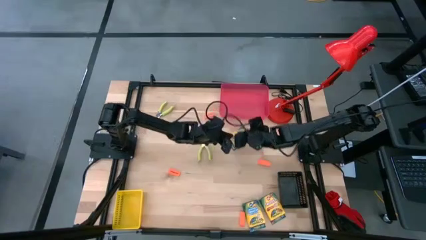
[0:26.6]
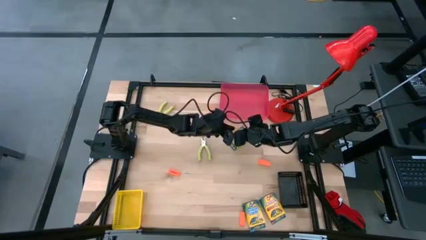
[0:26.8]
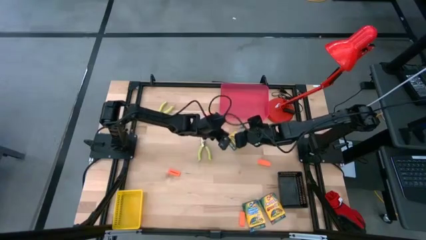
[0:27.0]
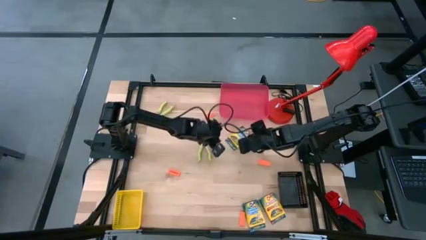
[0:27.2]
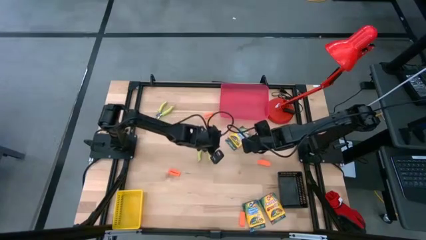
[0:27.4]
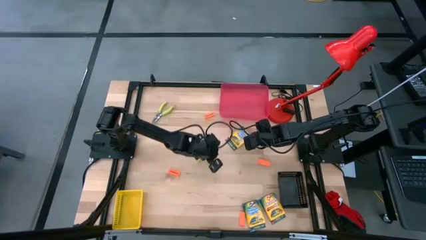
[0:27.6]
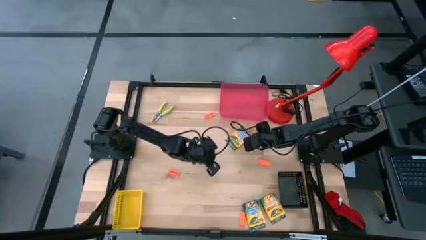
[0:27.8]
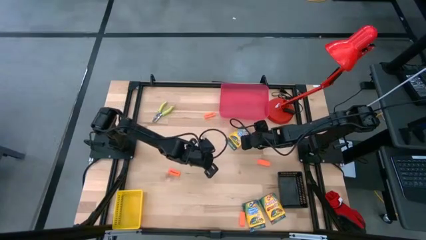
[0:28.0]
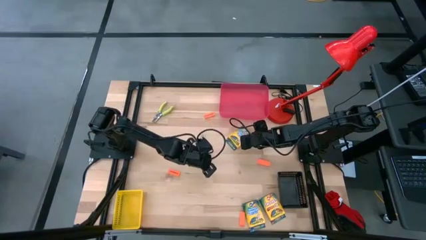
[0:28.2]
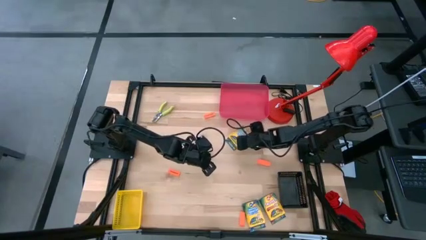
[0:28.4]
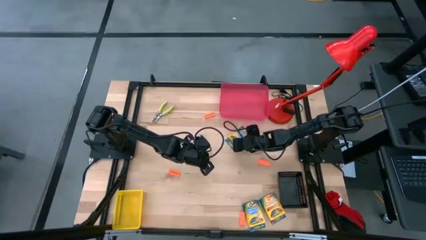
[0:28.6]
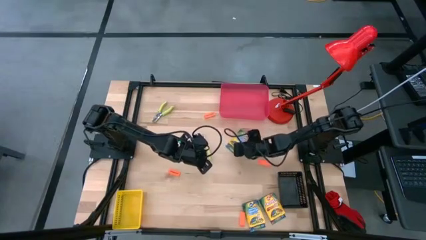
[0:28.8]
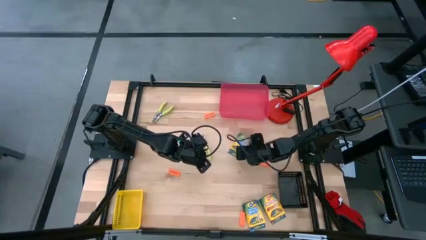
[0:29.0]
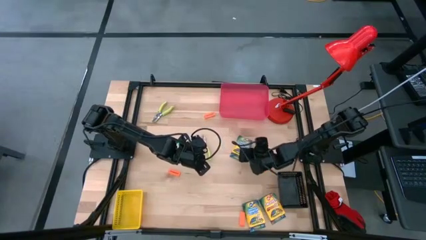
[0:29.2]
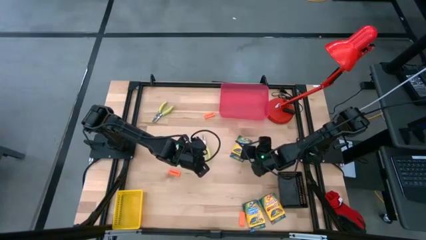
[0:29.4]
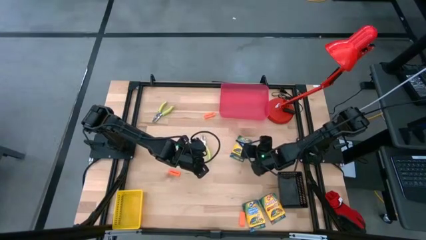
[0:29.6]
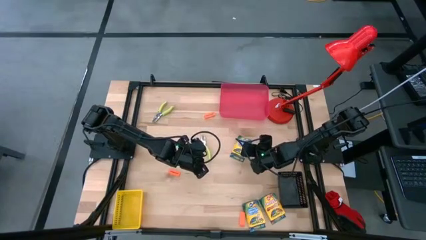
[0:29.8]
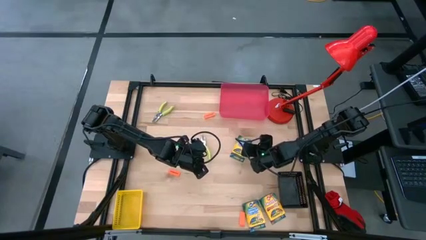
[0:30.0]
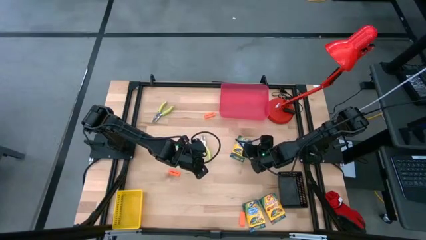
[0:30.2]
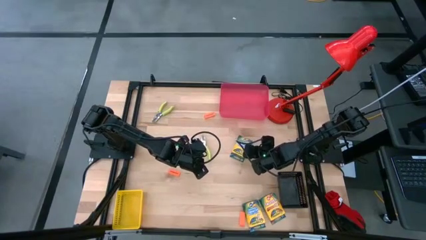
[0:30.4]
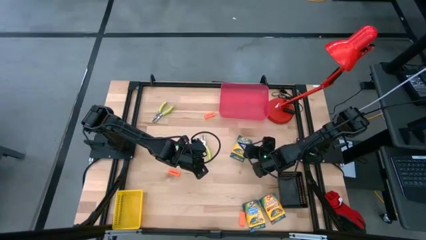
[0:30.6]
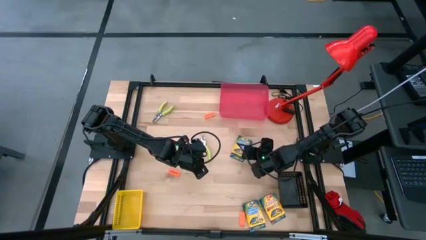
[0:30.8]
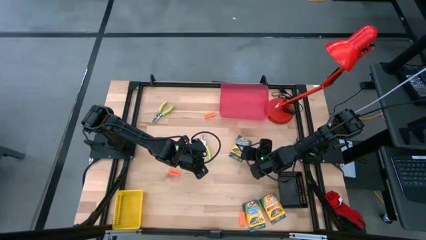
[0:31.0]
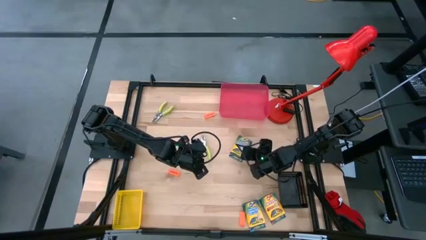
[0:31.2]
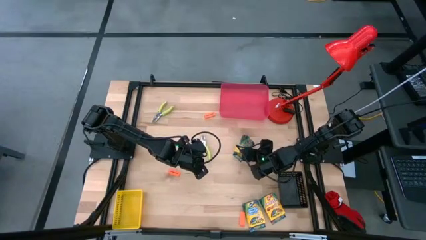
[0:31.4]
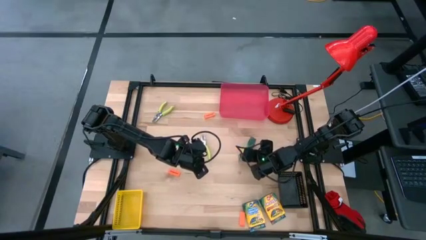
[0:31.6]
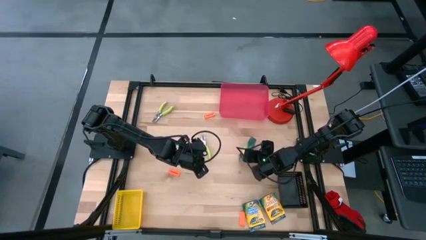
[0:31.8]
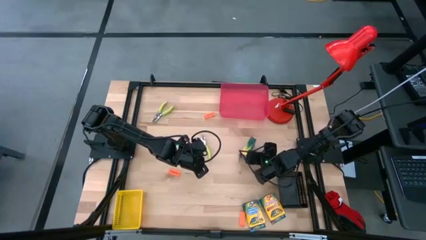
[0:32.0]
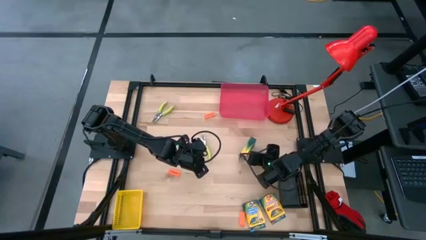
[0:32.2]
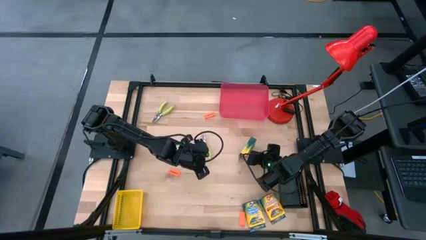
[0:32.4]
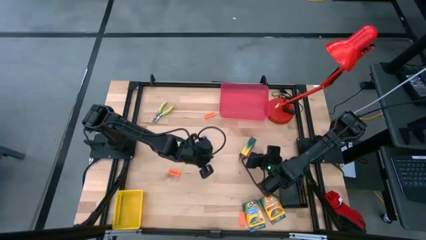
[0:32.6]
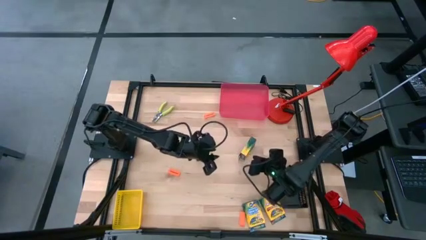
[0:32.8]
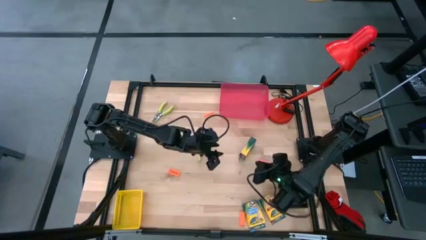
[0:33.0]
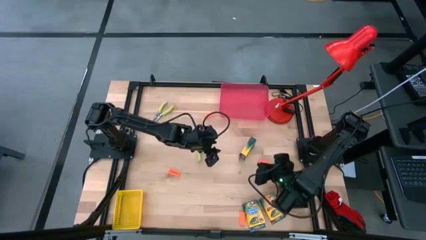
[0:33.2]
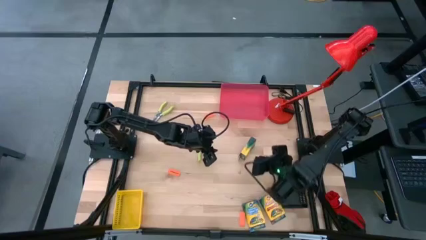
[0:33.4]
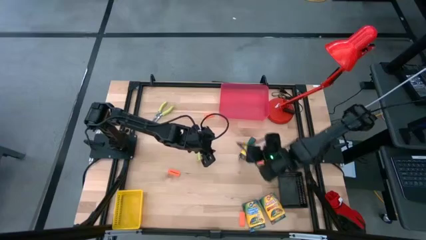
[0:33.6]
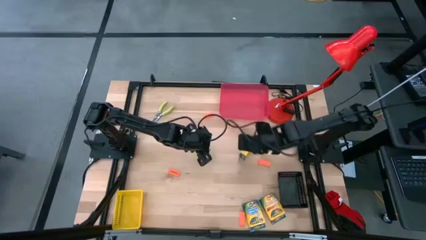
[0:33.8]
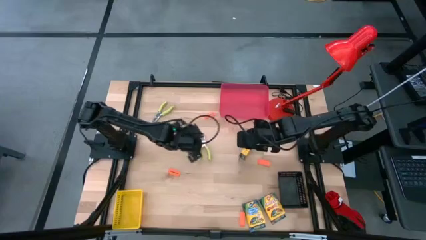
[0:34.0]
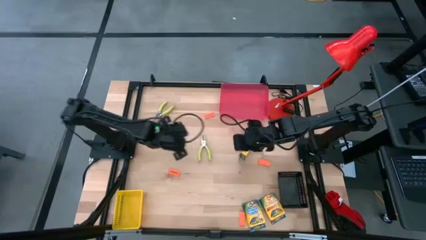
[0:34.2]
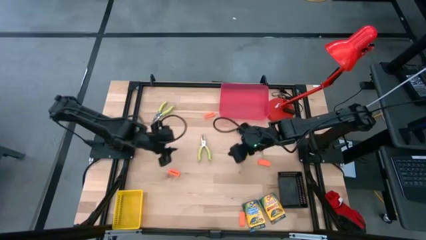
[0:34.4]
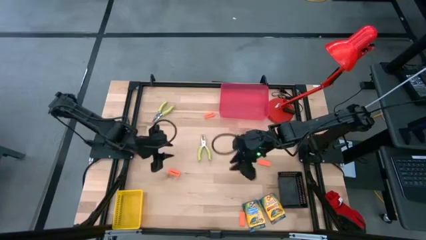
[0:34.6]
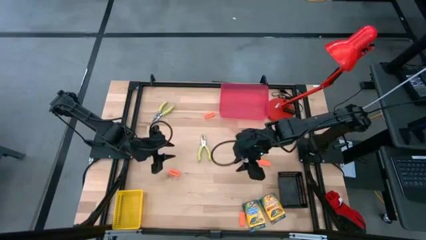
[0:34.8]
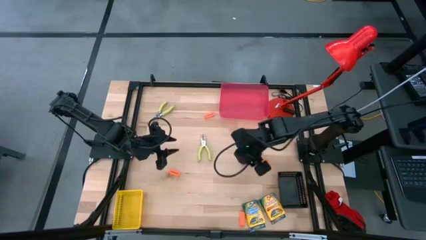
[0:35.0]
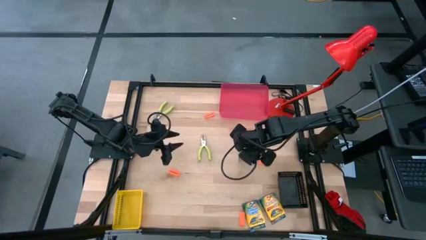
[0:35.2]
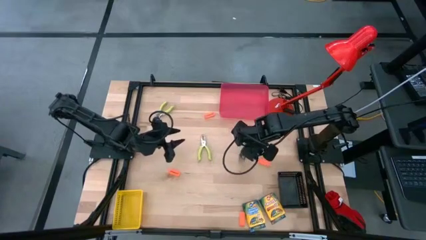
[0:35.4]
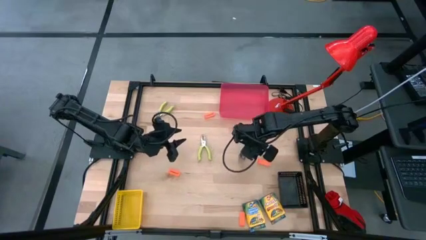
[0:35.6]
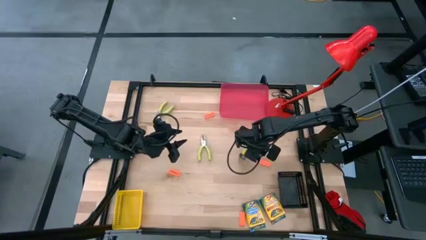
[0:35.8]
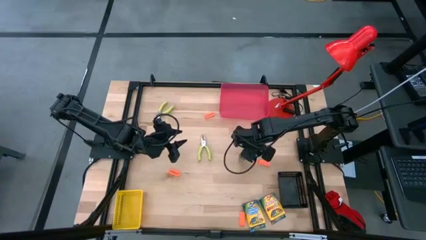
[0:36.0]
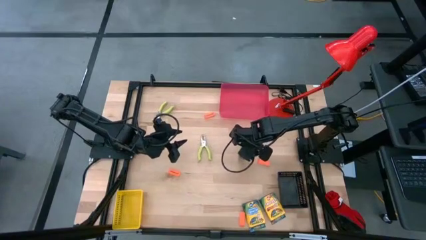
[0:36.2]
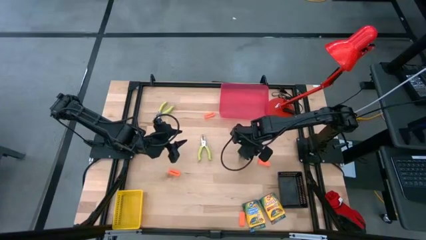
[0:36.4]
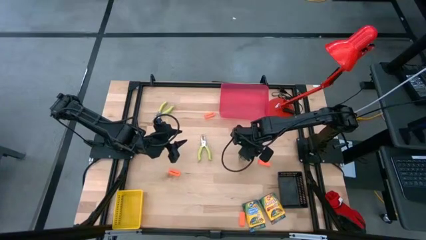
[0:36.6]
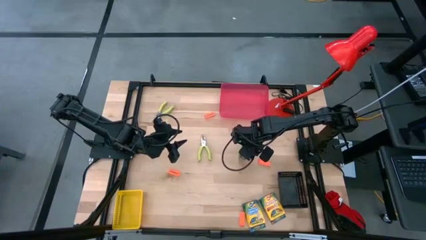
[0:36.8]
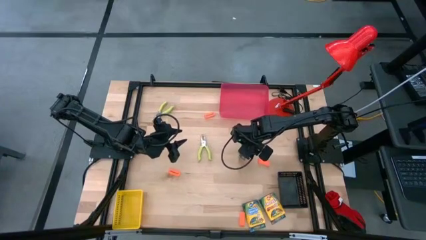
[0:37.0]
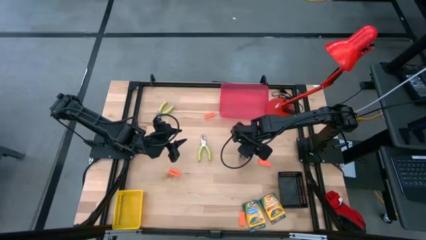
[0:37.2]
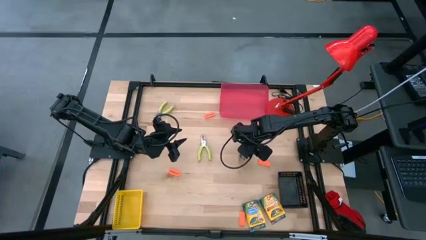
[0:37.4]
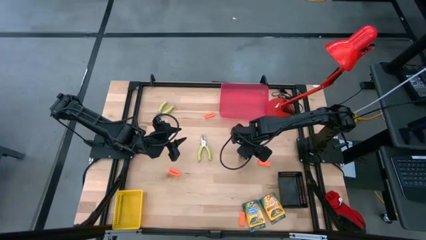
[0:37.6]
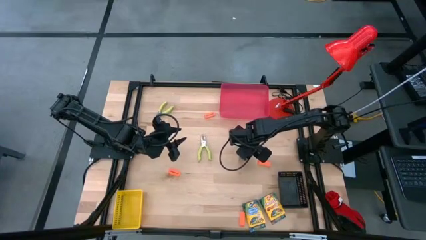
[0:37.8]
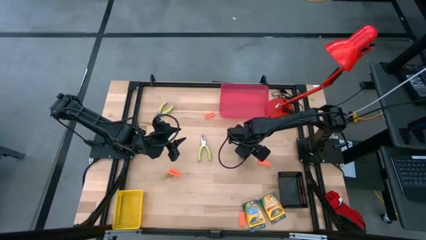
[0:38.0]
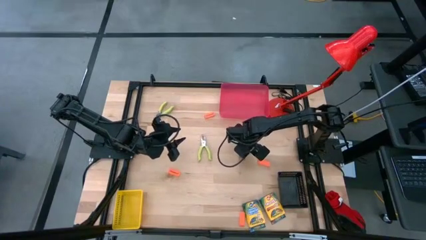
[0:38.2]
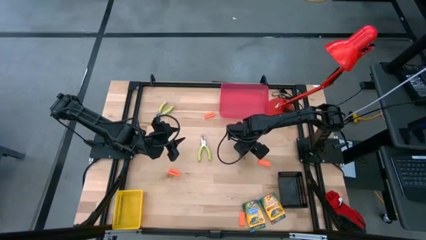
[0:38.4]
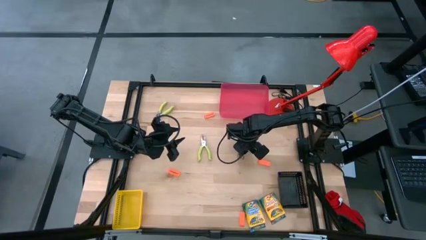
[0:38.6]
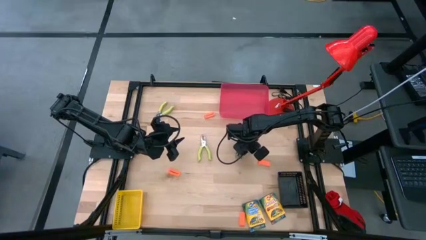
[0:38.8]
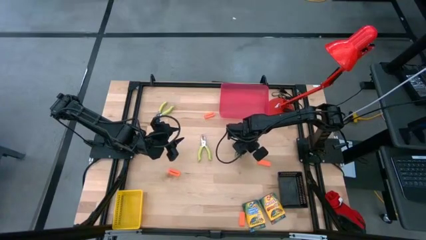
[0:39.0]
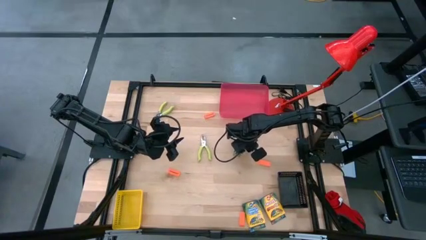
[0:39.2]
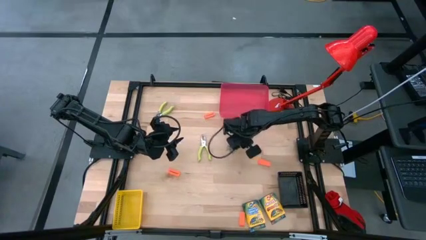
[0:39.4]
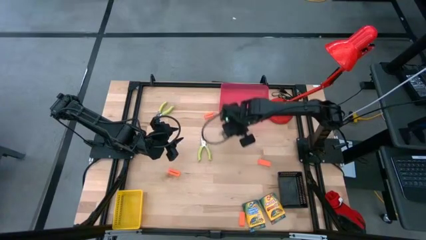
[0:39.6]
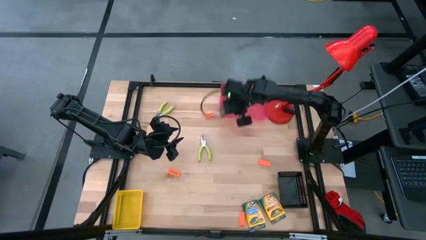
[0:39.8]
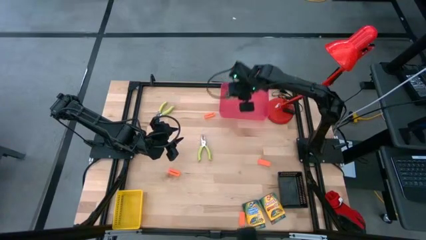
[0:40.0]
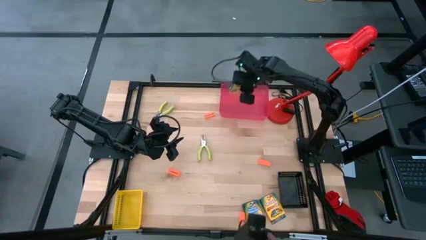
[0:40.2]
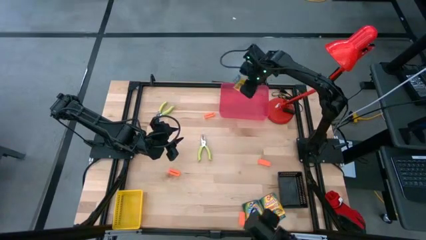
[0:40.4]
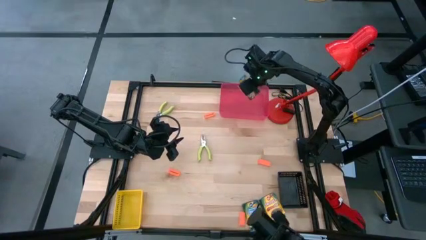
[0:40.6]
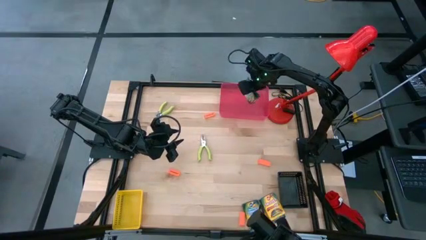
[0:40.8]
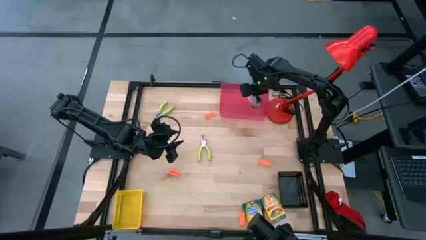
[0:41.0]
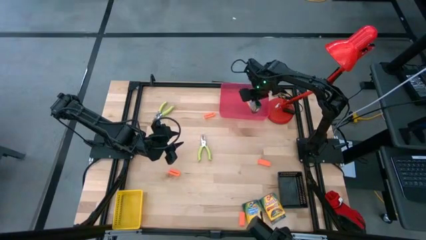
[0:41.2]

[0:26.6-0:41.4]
Task: Pick & Place School Supplies
Put the yellow crayon box into the red bin
